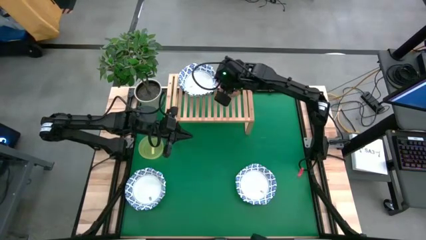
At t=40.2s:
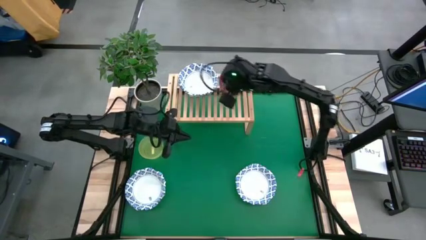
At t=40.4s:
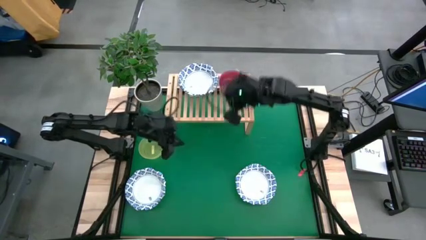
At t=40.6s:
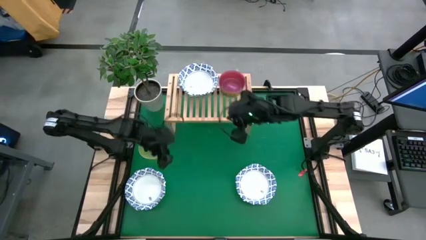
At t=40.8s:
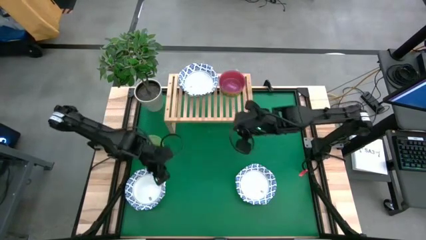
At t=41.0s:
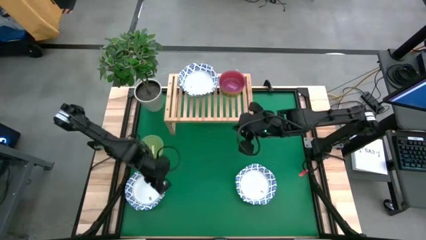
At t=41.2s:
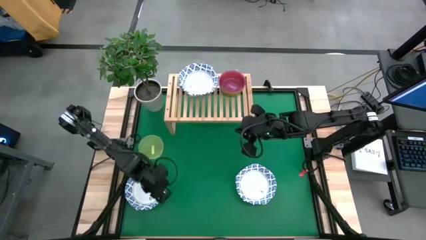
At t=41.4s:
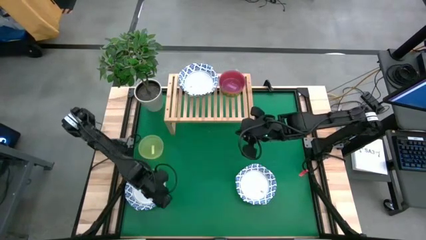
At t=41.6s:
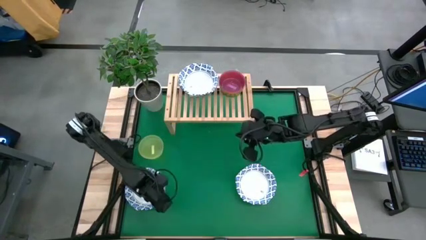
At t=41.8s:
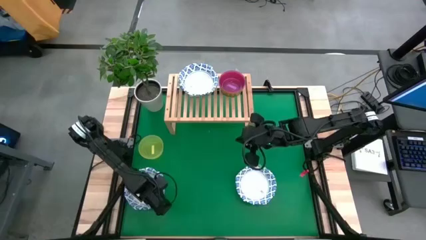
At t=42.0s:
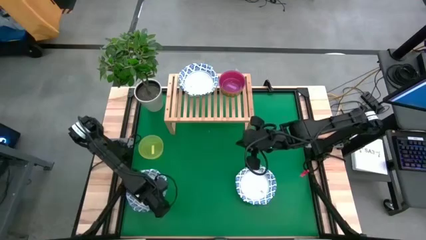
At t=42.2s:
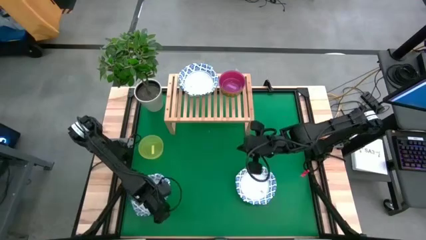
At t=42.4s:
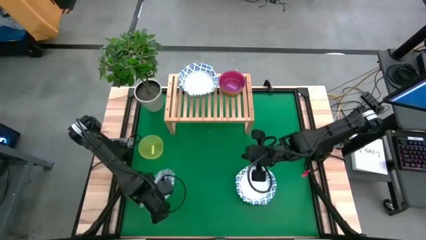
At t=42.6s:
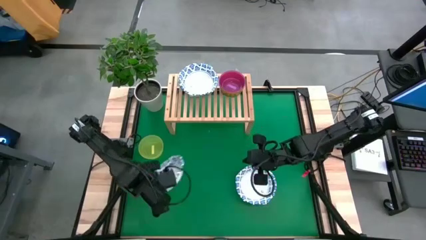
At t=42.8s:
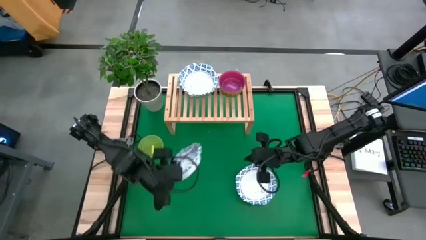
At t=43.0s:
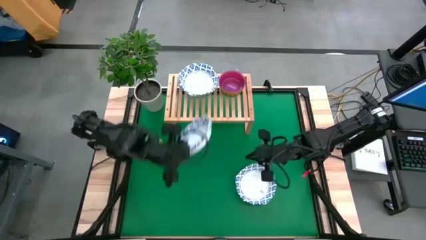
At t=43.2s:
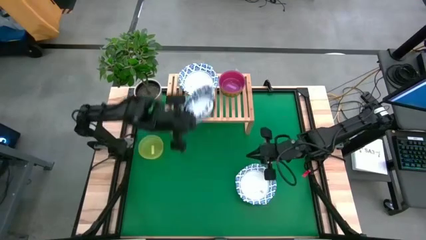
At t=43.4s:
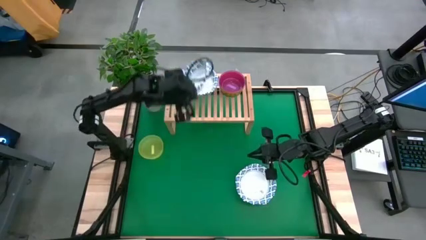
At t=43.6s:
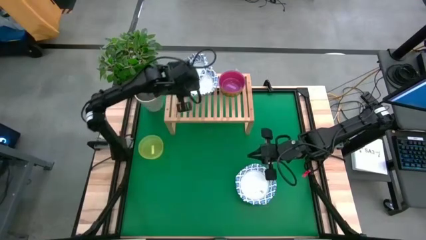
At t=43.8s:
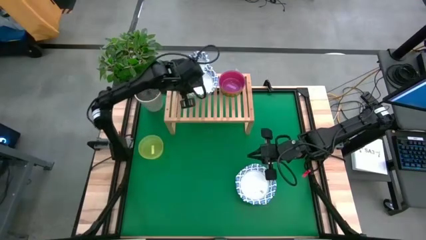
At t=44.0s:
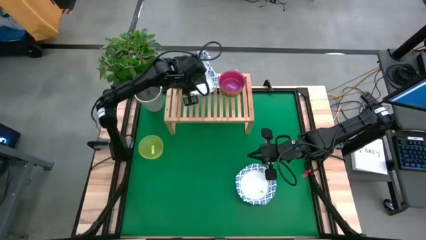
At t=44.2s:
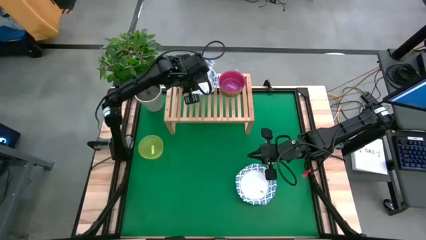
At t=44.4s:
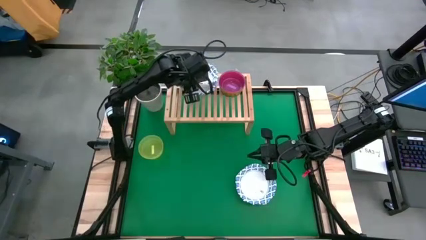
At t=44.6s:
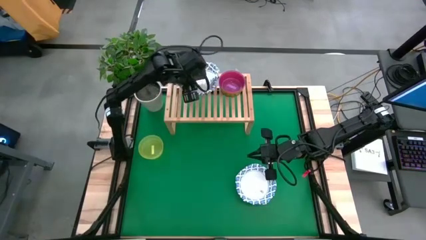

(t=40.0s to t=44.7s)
Task: Place and stack bowls onto a shelf
Stack the white patterned bowl on top of the white patterned bowl on the shelf

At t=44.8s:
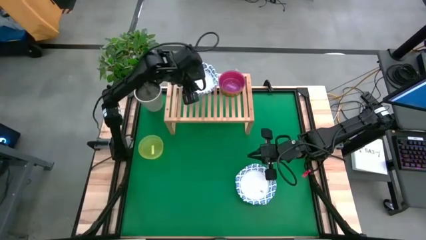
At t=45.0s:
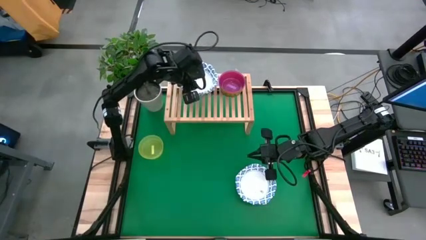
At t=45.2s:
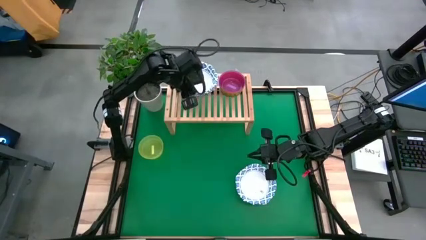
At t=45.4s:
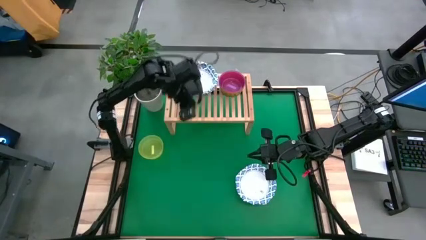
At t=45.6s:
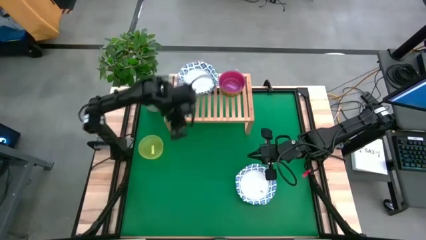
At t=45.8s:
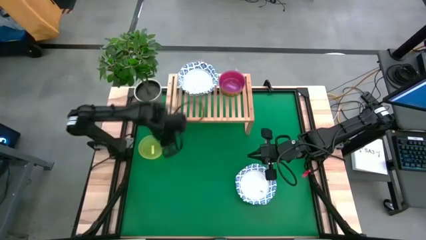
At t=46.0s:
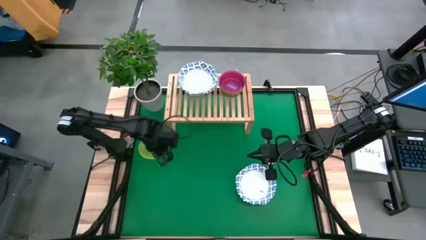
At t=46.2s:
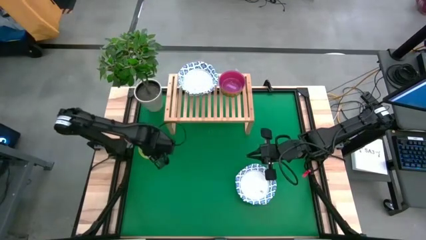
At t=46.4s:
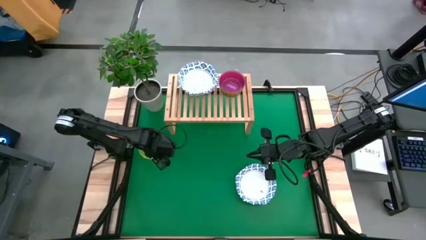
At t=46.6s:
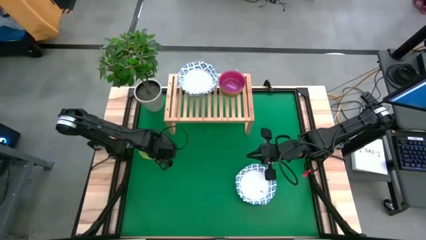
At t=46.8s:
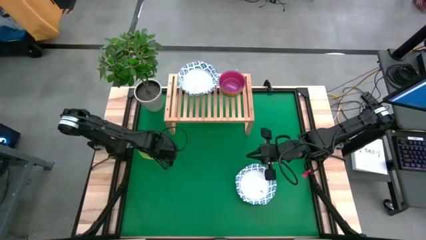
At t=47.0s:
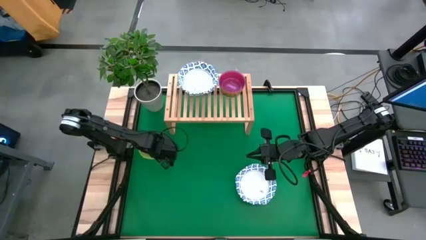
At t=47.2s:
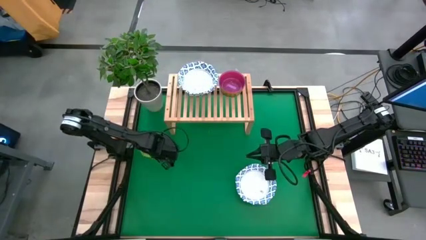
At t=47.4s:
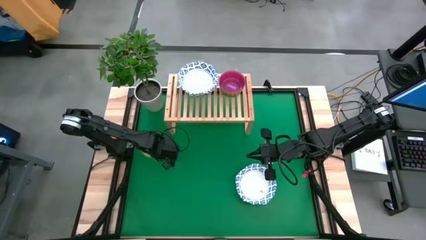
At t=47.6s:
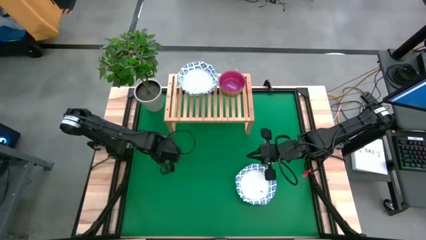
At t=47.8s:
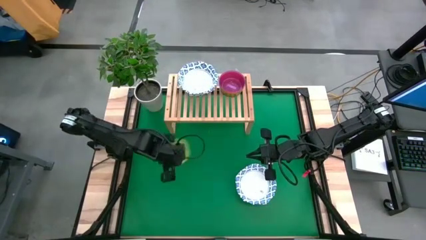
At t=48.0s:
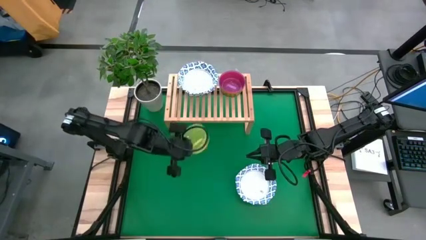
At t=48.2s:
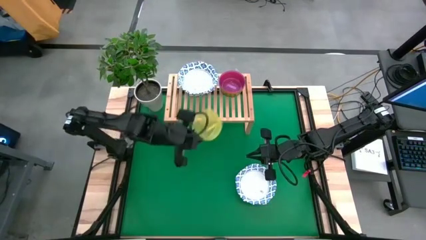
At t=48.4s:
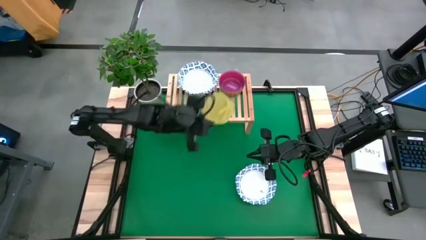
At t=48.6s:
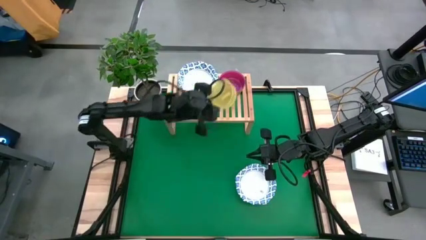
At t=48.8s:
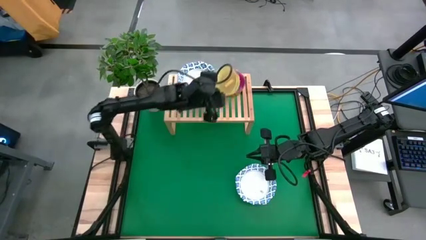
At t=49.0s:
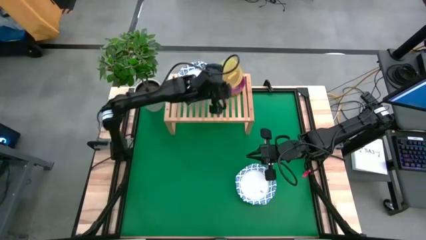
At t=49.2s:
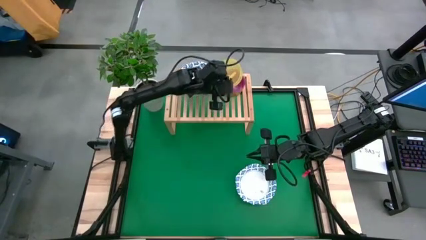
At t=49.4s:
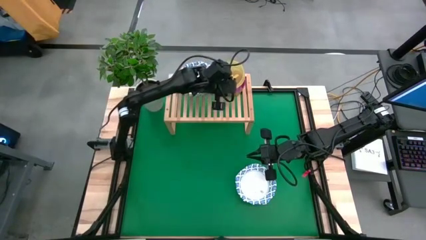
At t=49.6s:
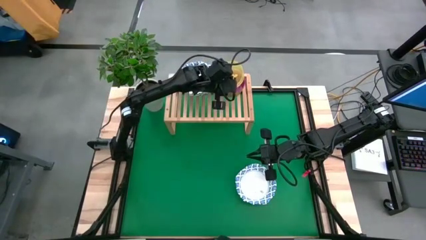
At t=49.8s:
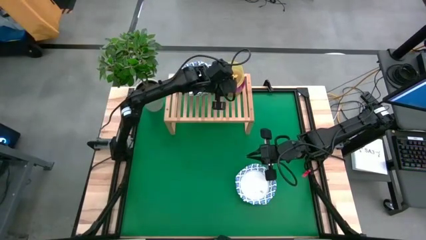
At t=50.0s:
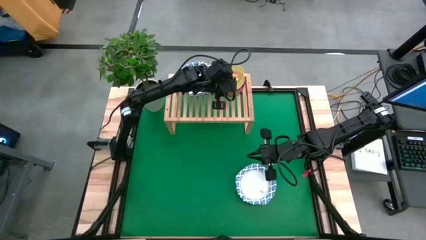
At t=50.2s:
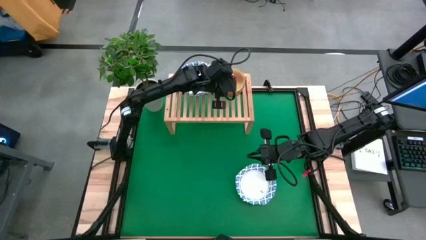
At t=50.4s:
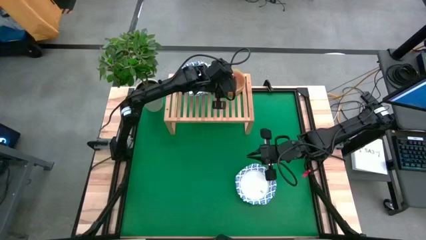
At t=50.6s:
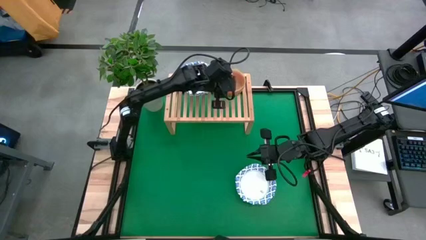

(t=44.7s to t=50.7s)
Stack the yellow bowl on top of the purple bowl on the shelf

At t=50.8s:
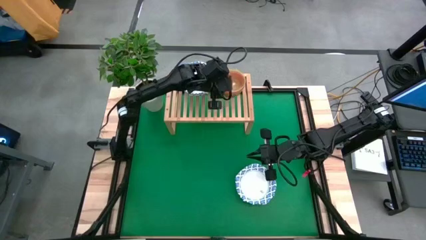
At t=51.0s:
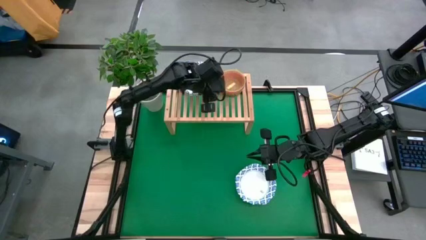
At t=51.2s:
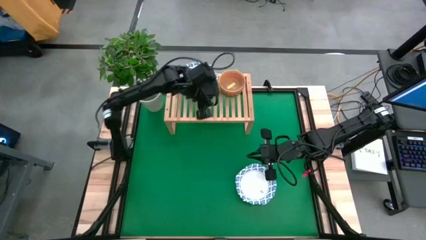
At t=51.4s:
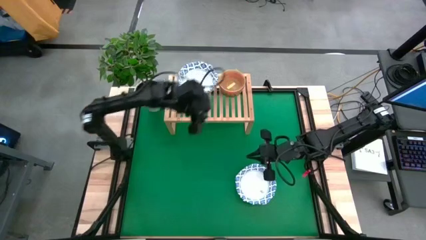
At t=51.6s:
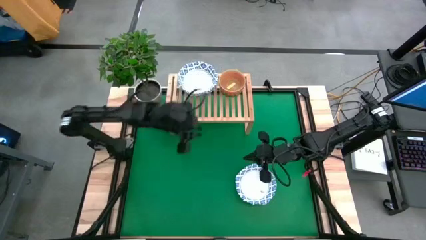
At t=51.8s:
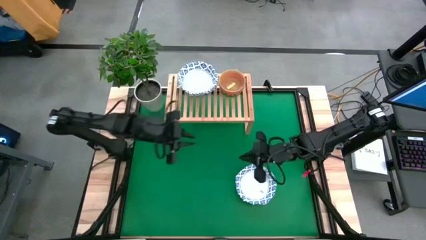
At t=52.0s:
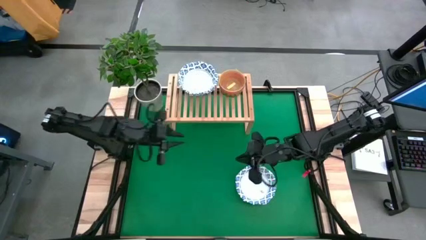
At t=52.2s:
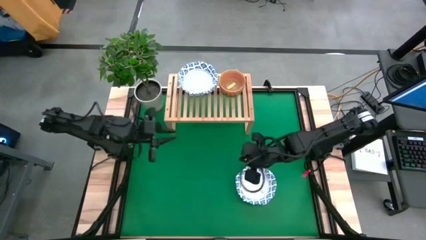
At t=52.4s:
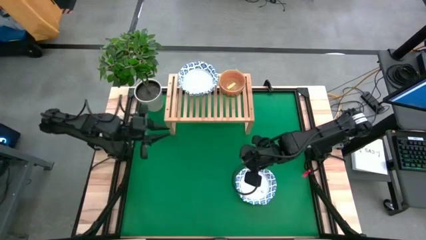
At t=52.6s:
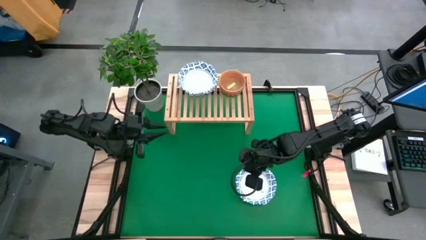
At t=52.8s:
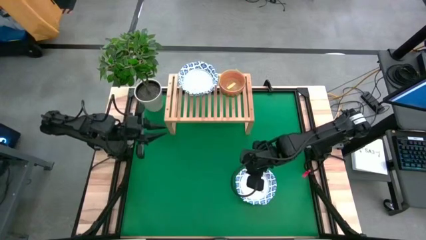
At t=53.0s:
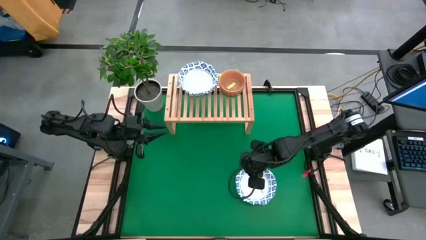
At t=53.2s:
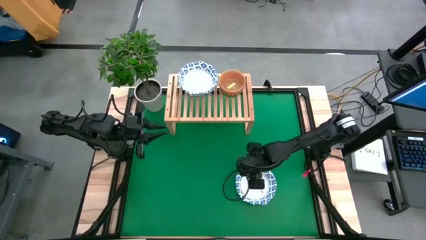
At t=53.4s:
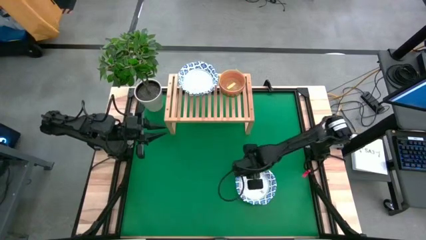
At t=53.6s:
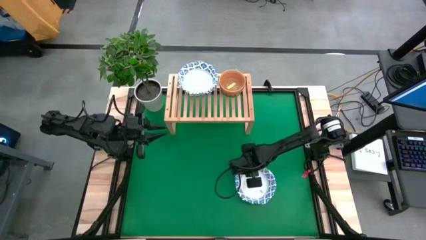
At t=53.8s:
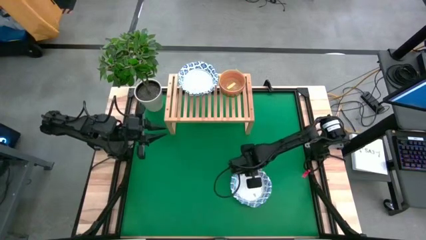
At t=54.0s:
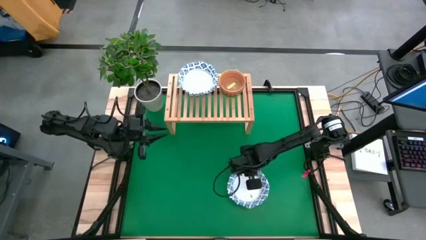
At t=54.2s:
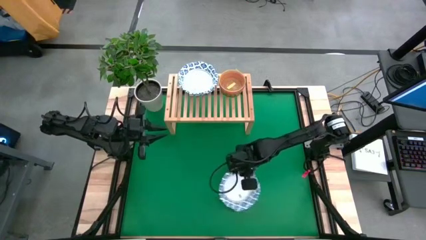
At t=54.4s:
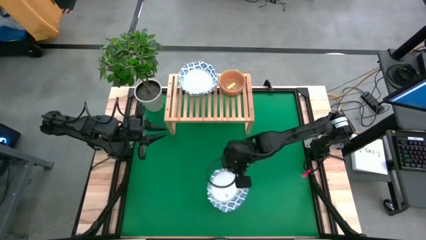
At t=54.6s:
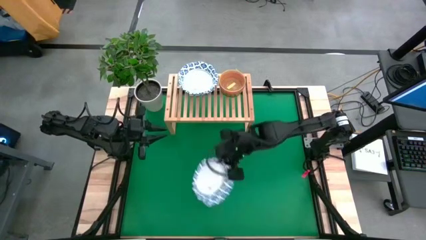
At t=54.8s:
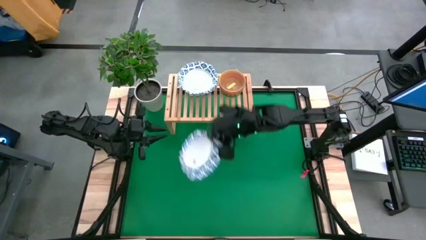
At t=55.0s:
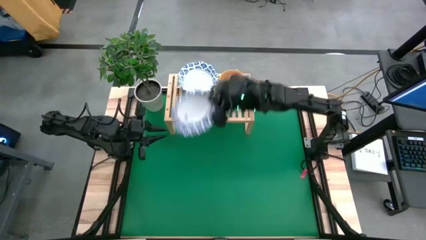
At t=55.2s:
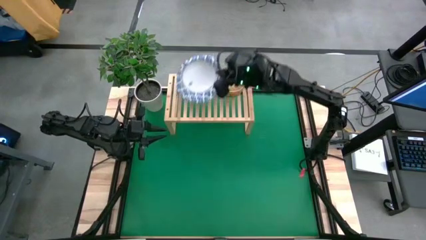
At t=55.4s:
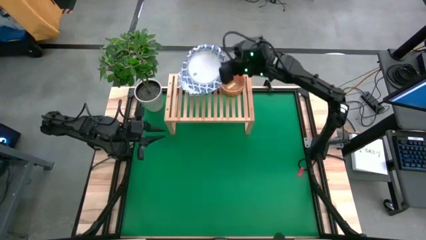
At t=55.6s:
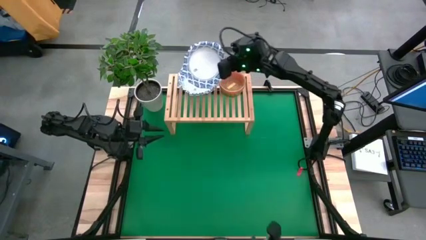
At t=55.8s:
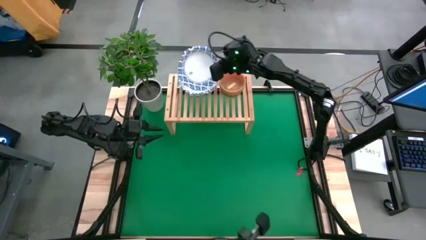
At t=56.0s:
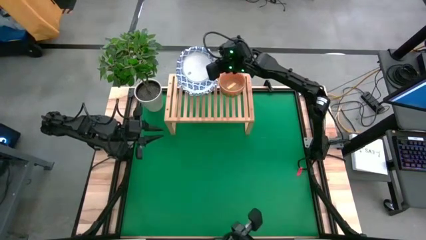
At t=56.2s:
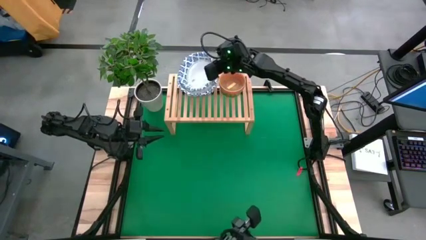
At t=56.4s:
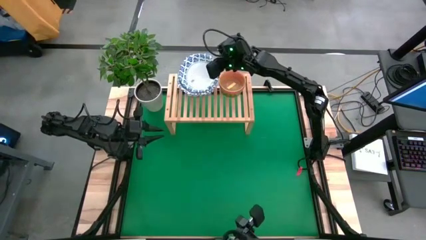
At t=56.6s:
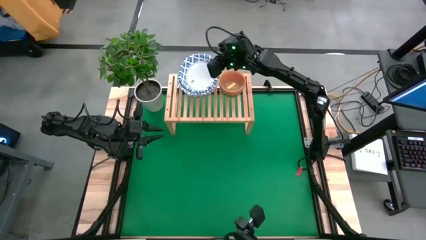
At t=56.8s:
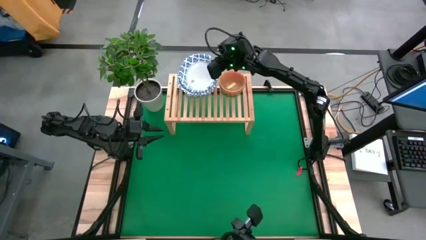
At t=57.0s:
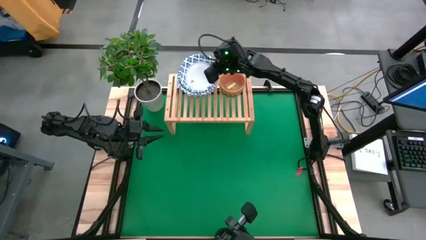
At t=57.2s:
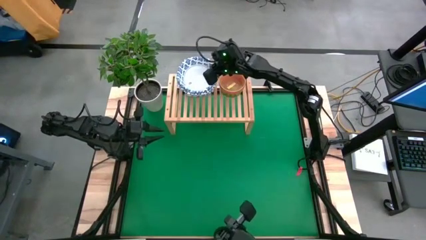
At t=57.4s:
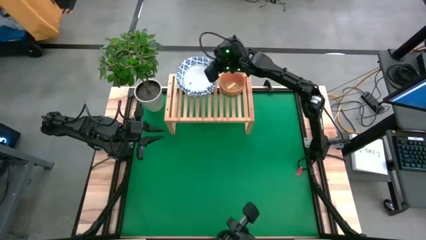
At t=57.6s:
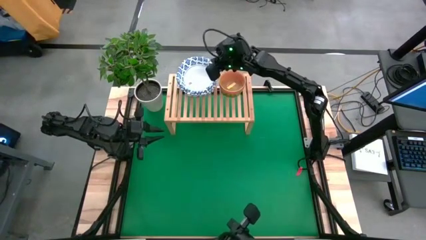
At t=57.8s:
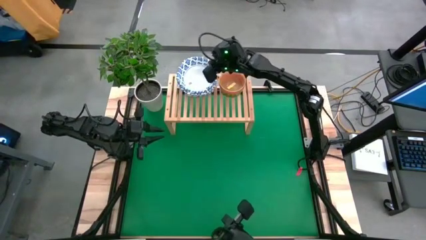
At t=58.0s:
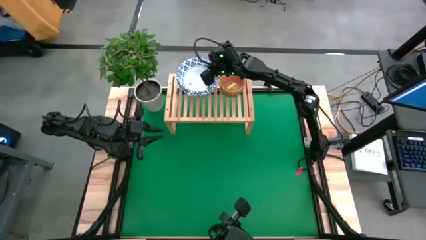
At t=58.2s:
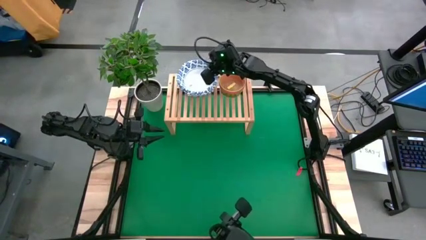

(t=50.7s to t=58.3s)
Stack the white patterned bowl on top of the white patterned bowl on the shelf
